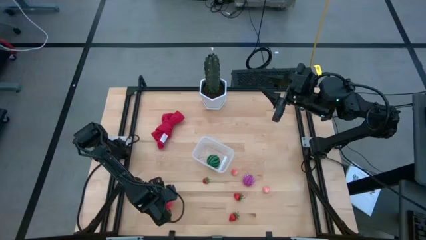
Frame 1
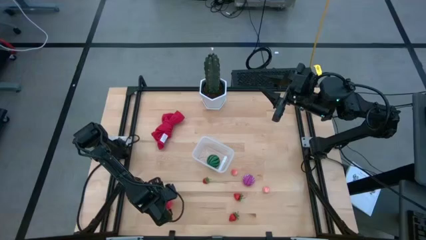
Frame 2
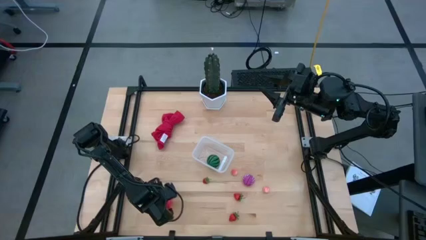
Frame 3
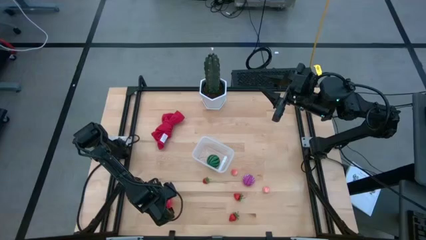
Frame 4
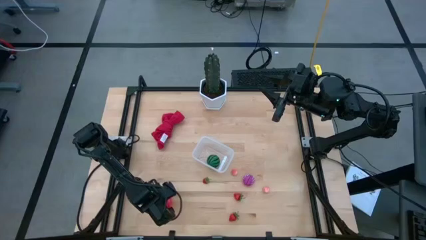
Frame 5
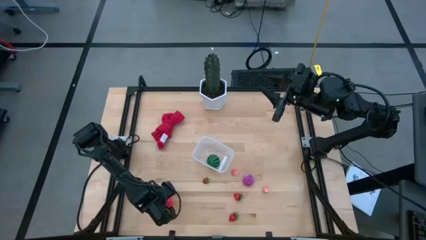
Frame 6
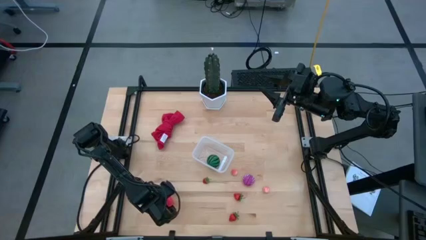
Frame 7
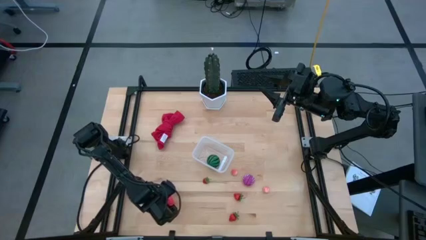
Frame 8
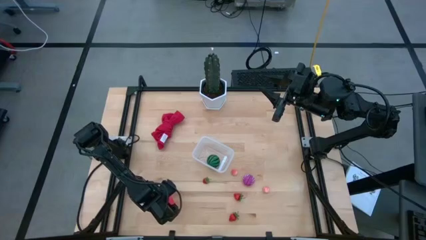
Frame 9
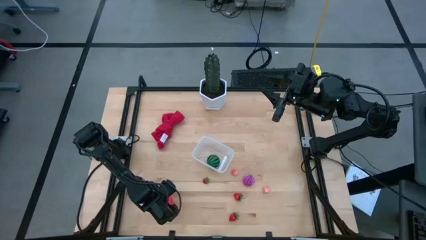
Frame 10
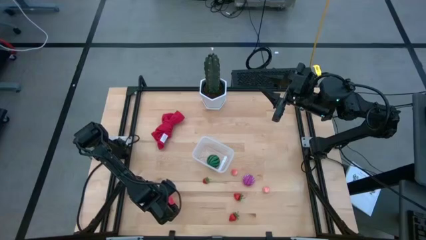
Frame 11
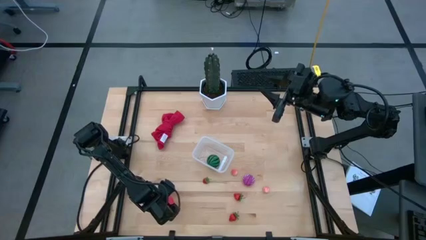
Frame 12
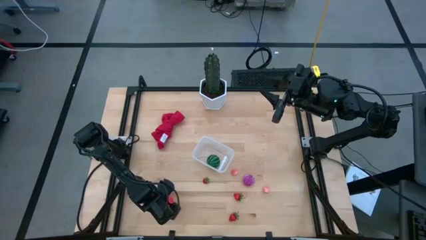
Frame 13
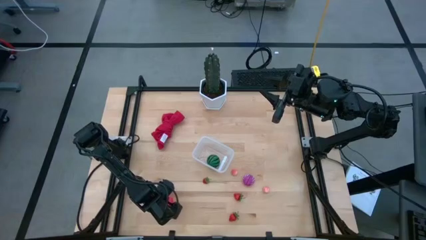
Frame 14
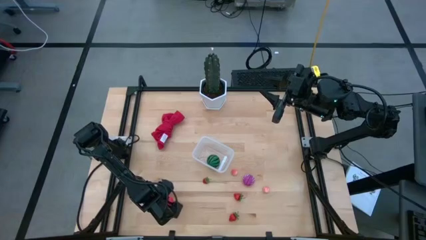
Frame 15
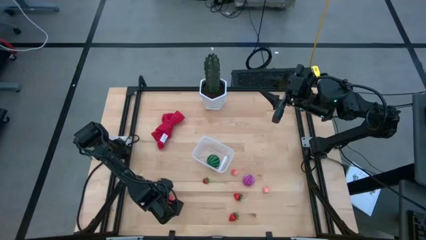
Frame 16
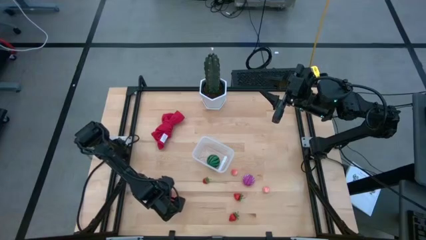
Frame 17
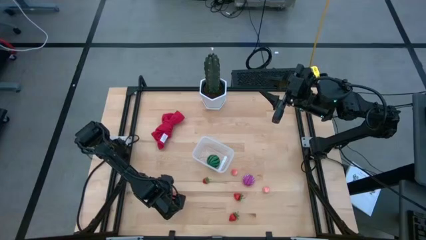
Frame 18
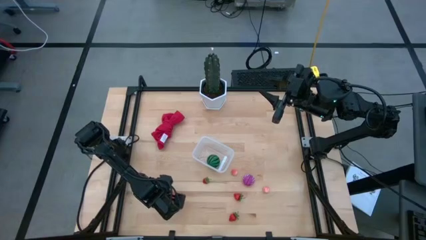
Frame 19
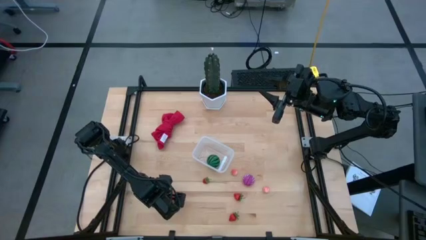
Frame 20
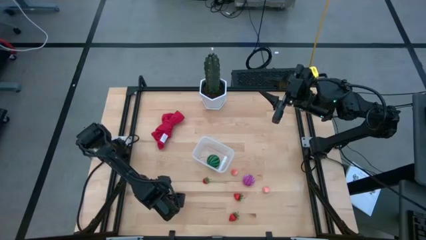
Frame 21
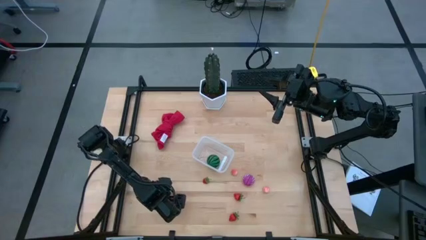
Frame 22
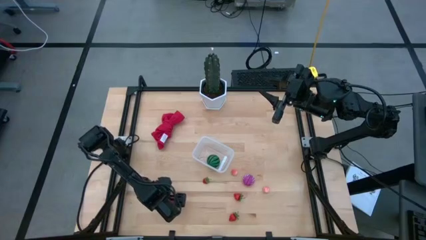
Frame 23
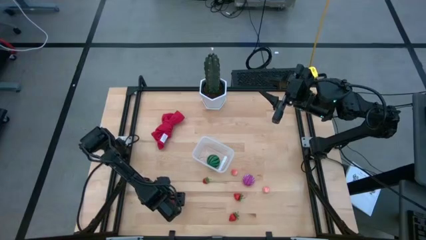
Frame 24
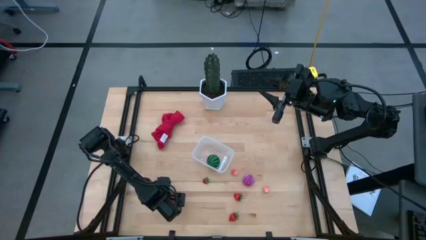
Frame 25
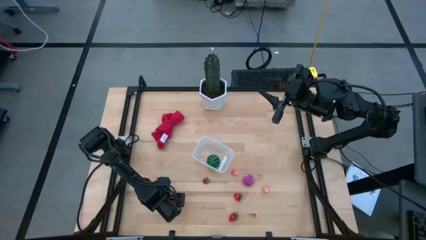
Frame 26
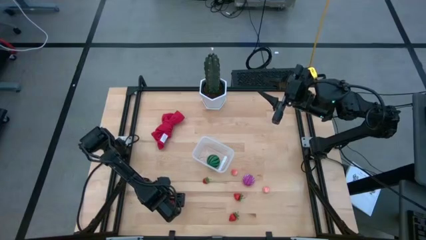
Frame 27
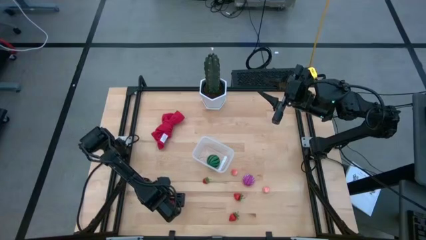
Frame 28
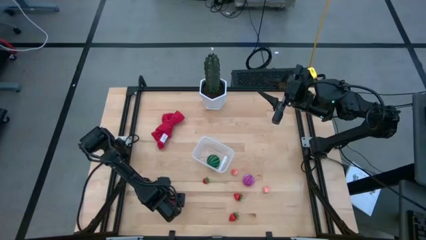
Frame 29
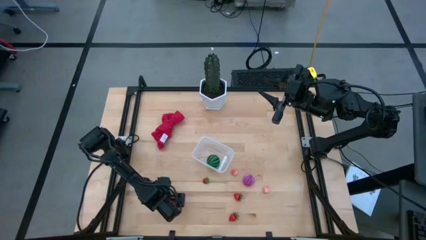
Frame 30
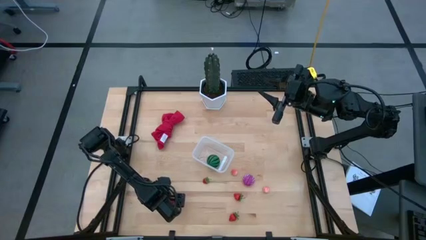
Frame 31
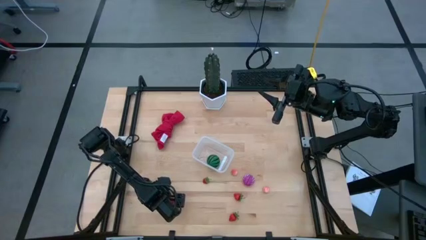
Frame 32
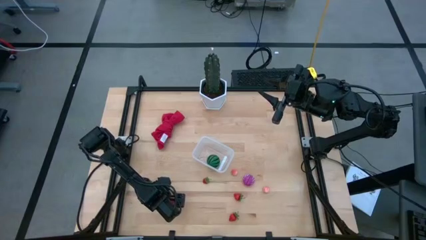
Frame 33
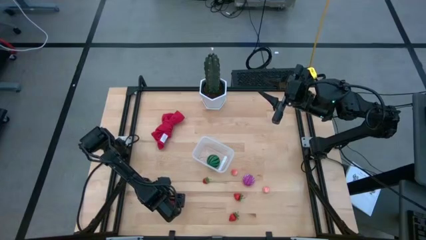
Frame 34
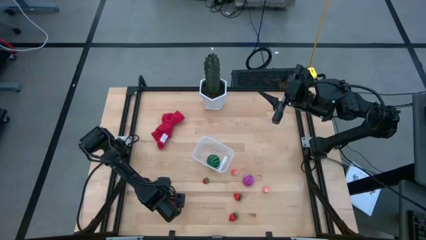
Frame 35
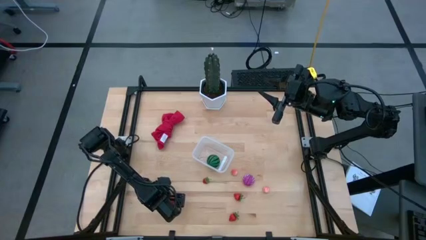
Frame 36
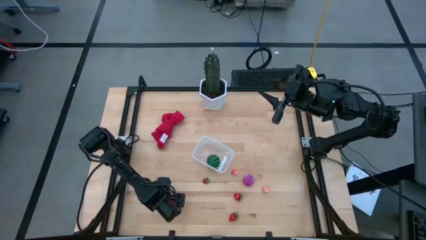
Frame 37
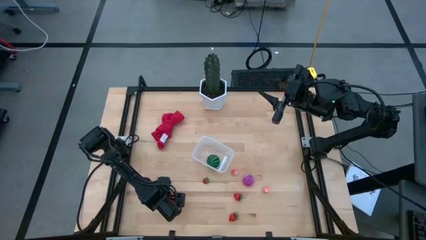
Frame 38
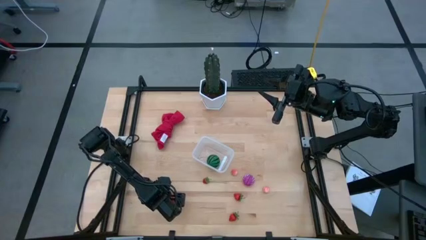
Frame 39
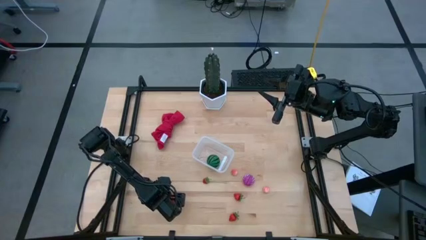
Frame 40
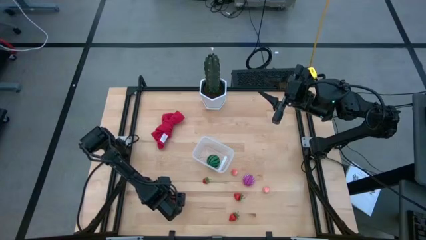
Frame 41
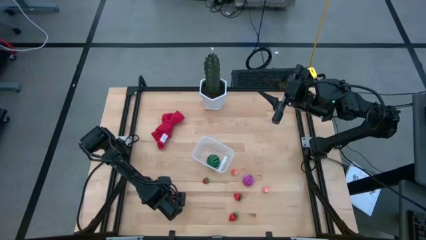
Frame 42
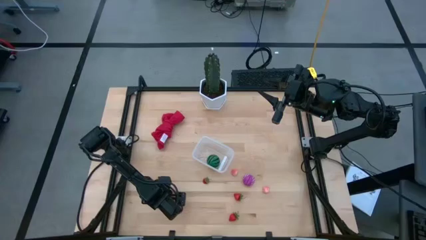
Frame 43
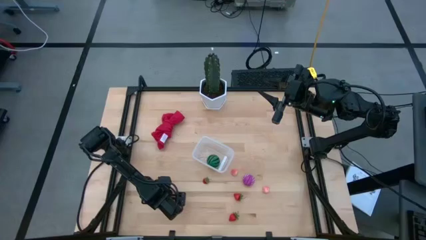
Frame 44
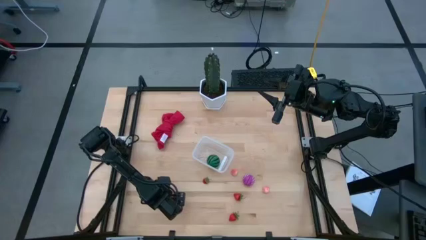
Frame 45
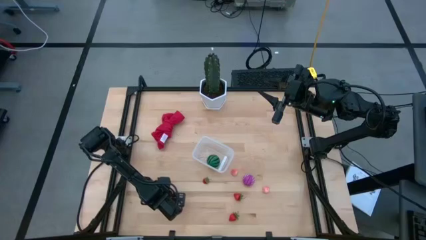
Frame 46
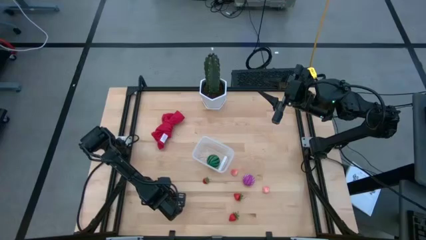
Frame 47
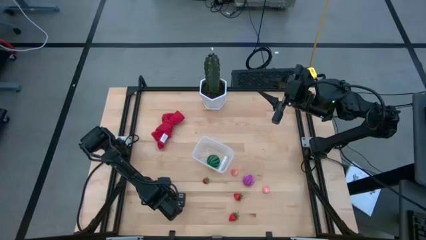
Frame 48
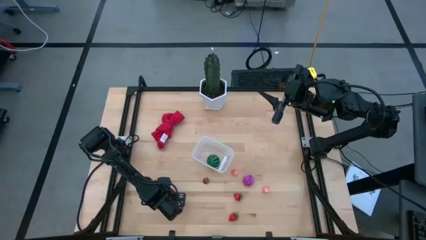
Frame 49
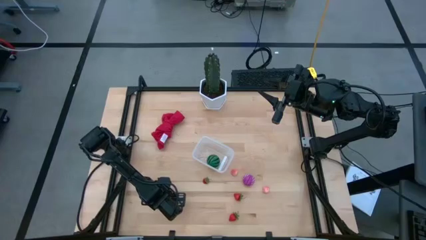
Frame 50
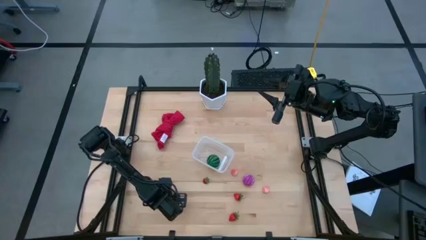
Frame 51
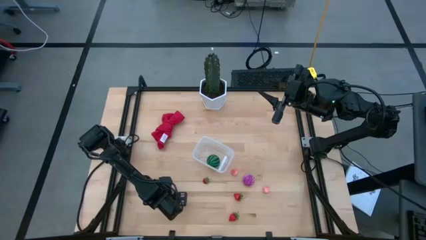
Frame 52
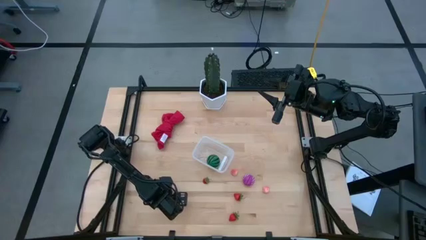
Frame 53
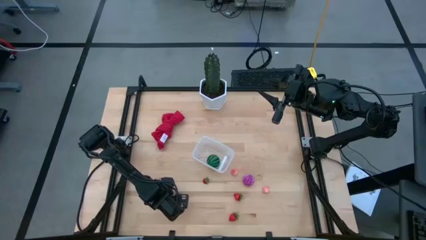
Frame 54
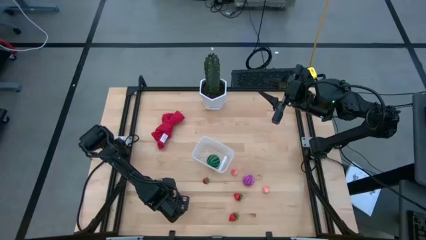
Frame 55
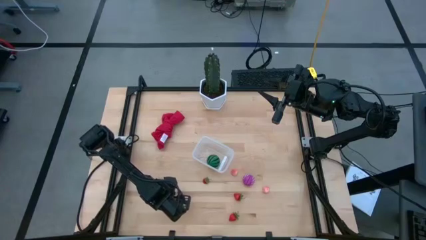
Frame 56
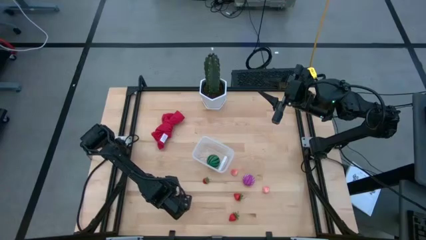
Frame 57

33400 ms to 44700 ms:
Task: Pick and placing Produce into tupperware
Put the pink dragon fruit into the transparent container

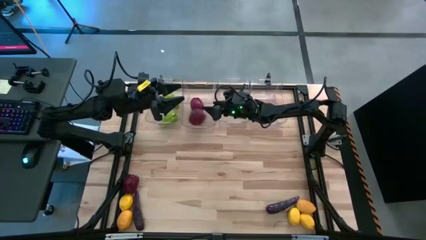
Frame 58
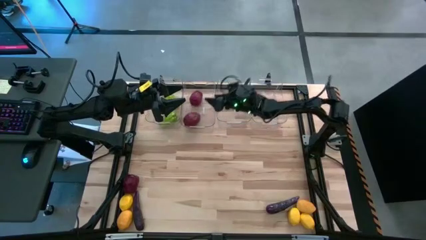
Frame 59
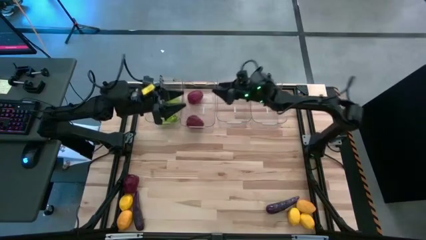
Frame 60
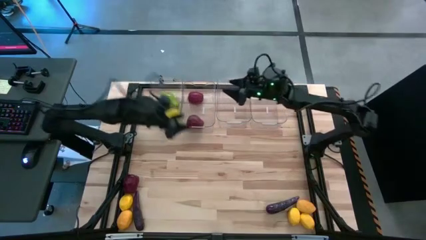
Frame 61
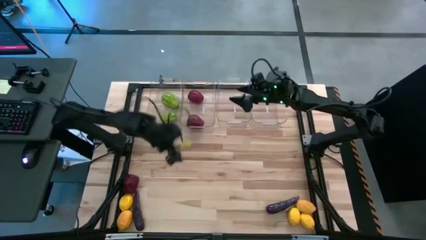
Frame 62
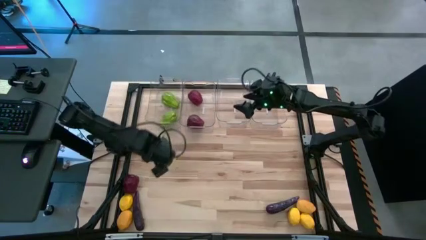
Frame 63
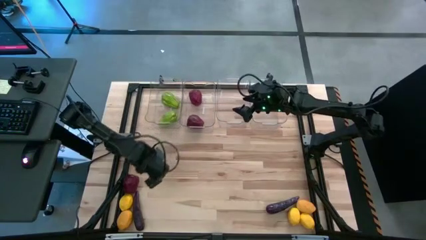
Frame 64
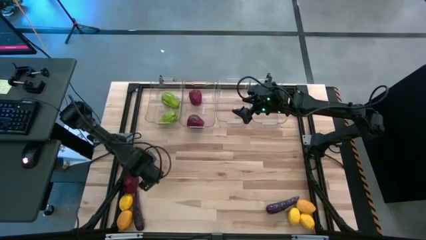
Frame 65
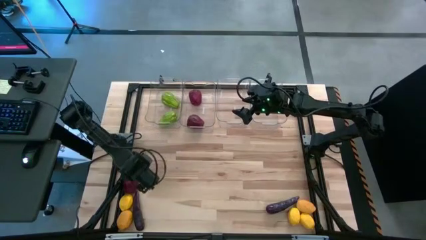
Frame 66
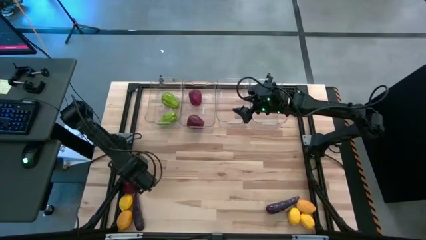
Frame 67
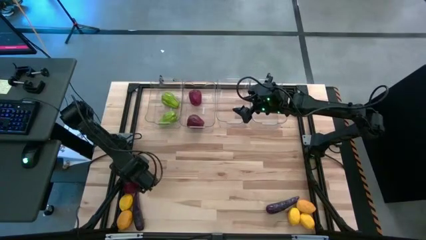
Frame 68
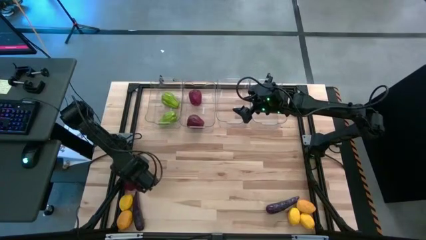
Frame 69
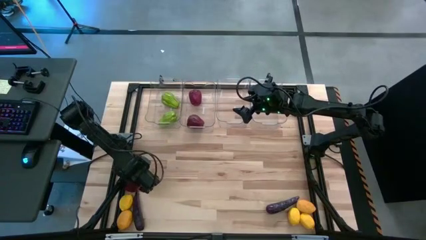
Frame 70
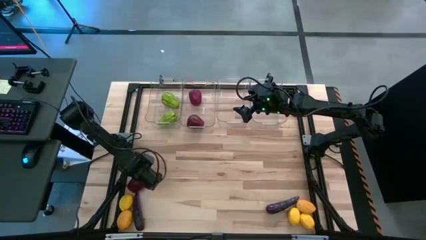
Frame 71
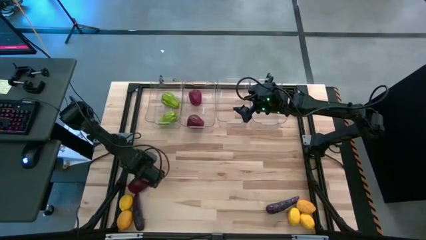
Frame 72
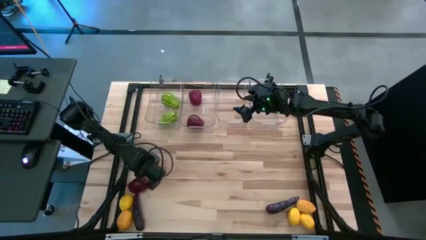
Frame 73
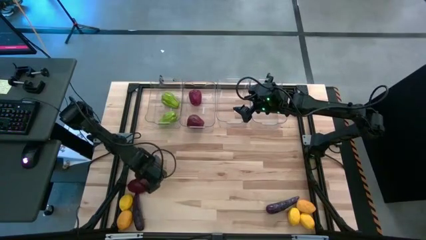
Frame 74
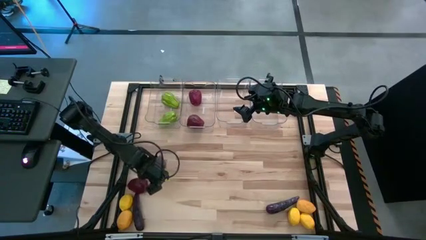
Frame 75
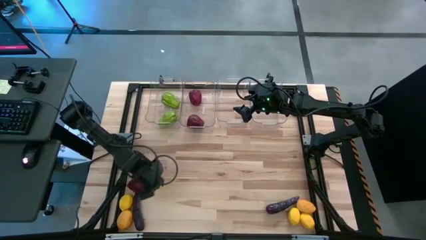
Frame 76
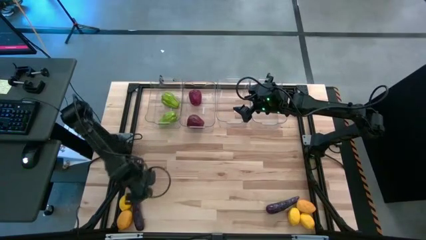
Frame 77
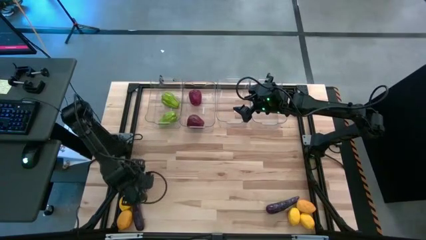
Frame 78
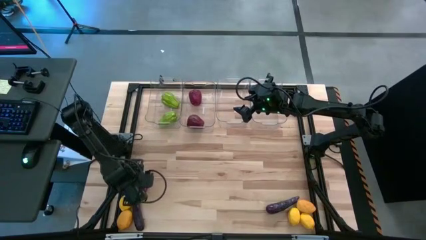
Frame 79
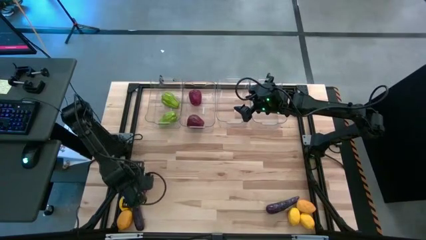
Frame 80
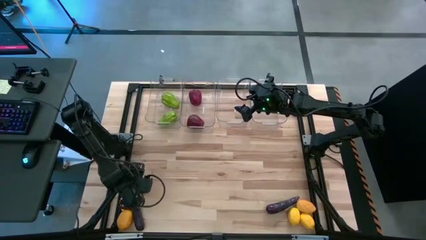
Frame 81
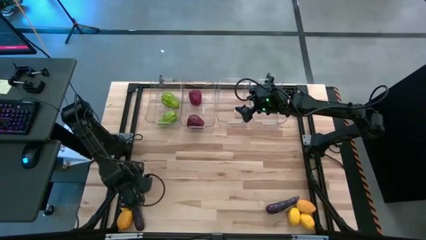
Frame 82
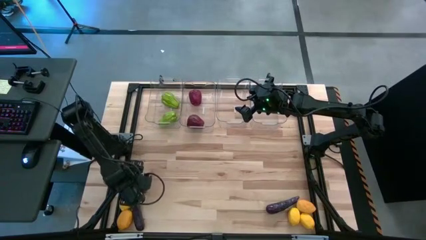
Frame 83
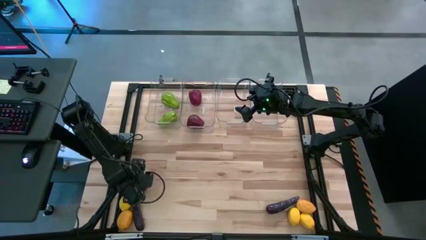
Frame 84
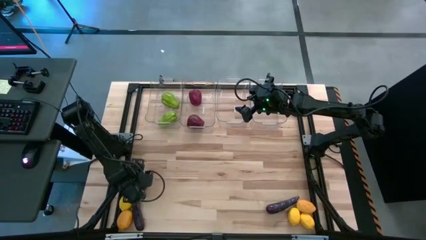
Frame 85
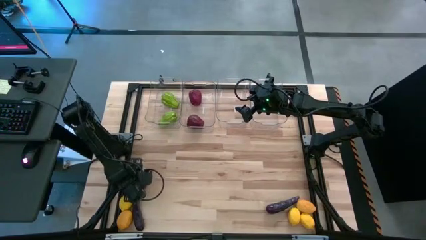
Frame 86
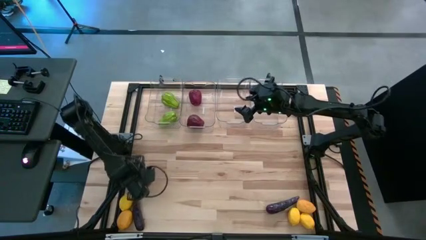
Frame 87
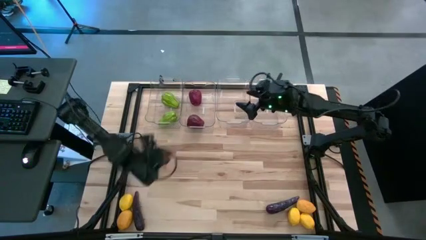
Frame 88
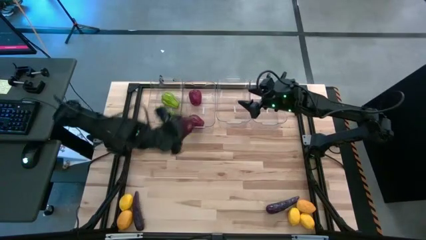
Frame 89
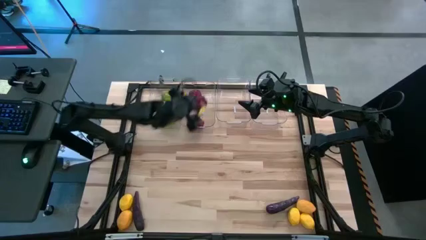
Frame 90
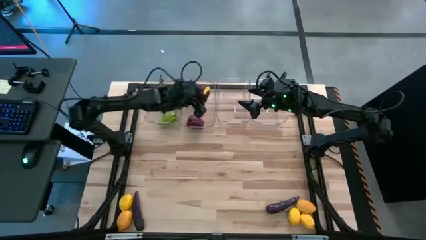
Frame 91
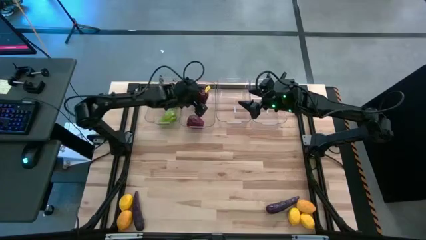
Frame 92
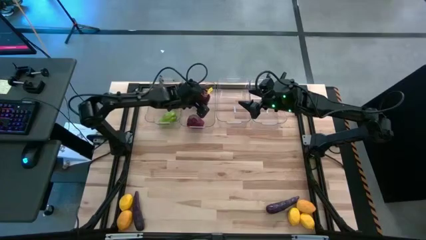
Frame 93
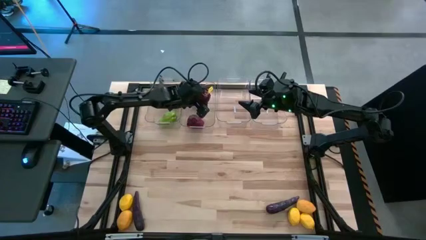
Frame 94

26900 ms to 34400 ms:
Task: Sort produce into baskets
Put the apple into the middle left transparent bin
